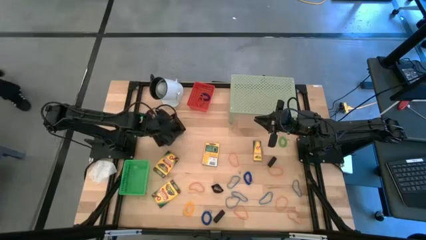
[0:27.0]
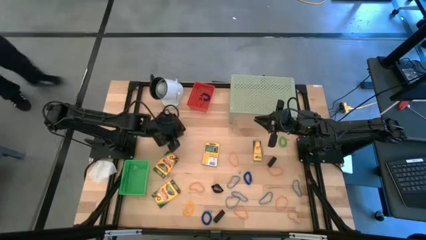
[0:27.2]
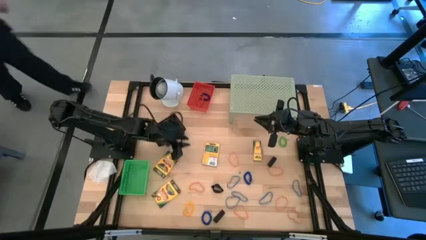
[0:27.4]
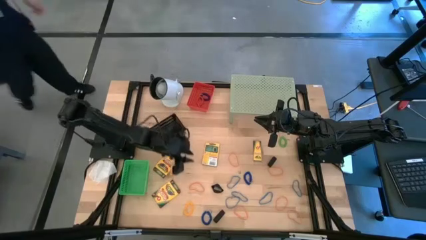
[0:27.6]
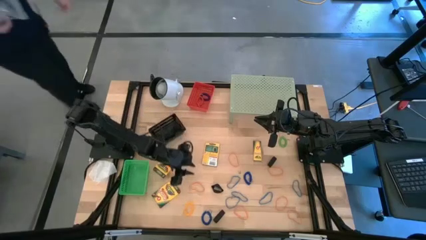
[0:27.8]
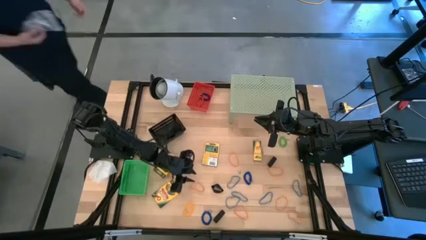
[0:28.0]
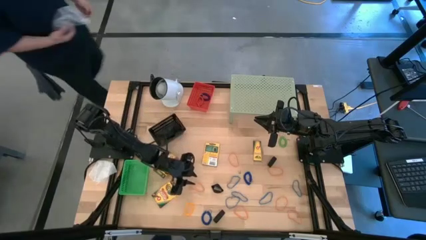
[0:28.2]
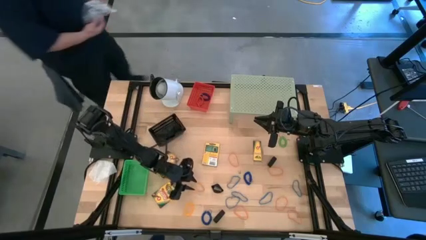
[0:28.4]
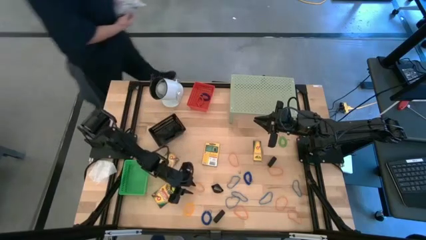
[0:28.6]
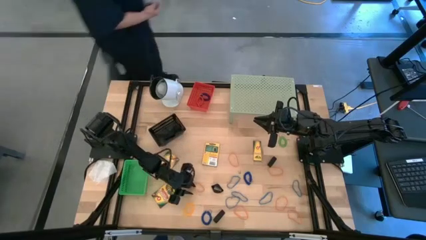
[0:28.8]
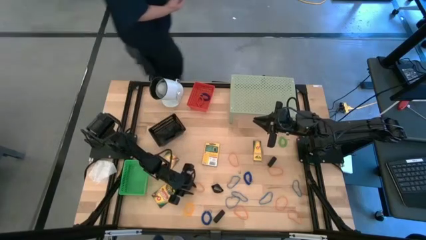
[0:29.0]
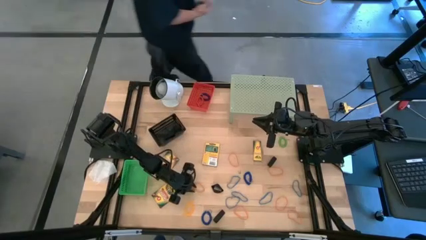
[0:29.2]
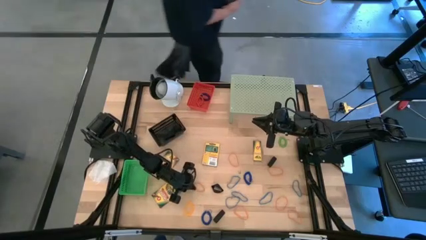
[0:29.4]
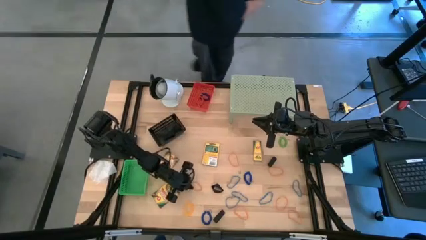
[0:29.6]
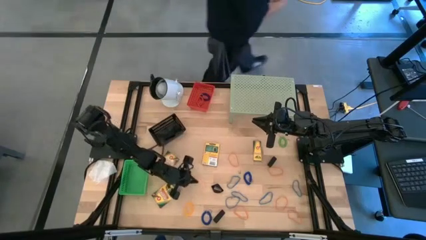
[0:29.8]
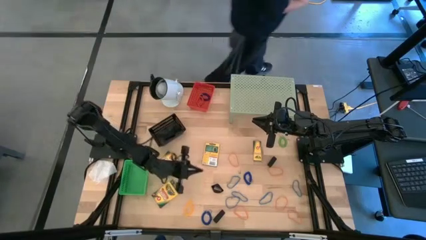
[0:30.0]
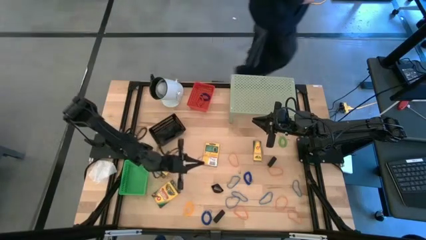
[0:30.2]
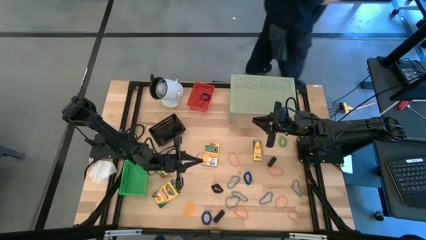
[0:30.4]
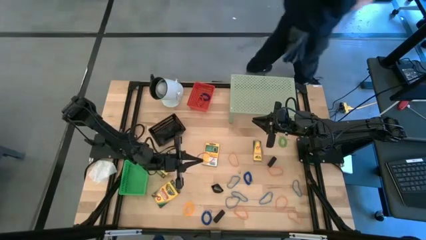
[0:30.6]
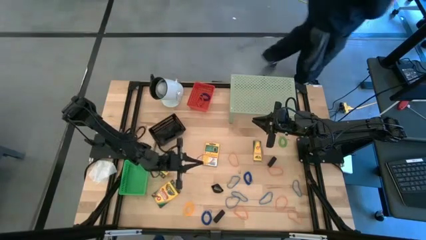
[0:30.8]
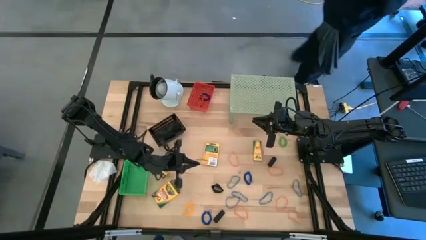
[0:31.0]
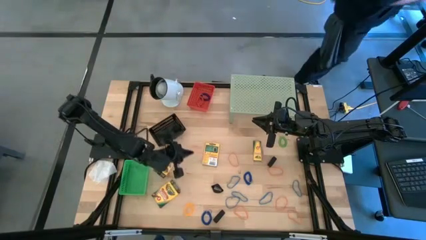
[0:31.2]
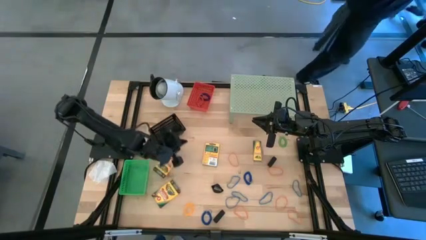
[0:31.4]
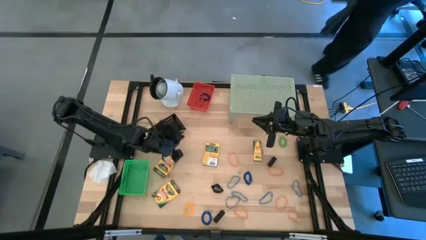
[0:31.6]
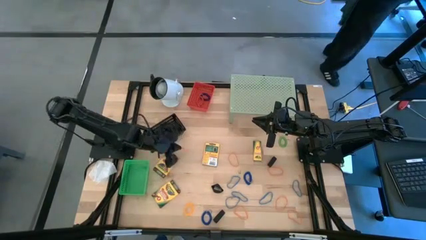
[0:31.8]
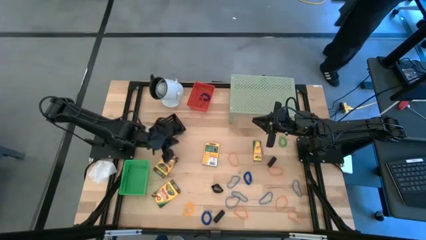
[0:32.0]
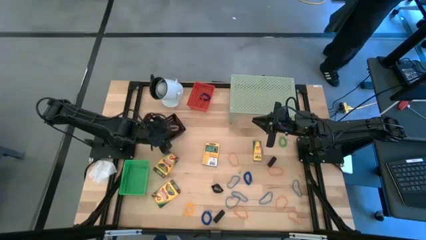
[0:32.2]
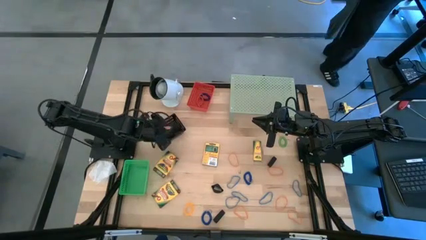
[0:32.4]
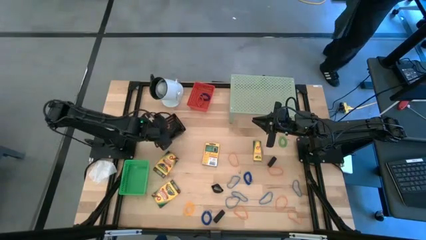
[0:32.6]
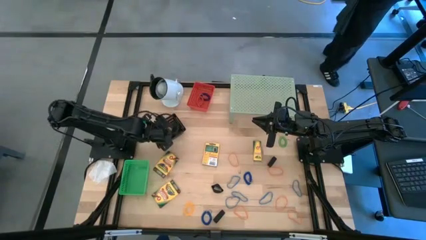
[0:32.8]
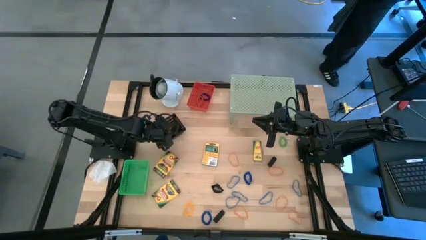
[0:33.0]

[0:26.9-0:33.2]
Task: Pick & Place Office Desk Supplies
Put the orange rubber band into the black bin

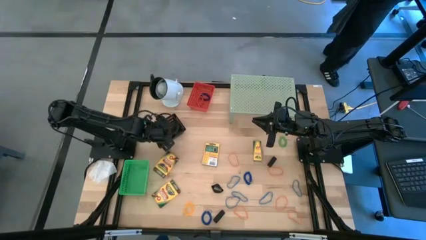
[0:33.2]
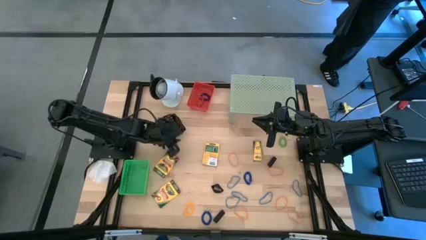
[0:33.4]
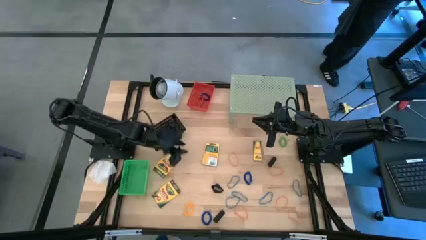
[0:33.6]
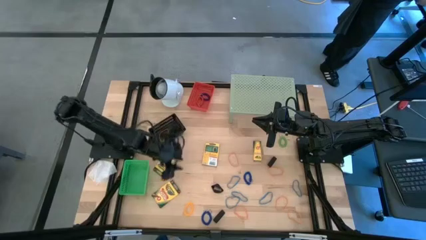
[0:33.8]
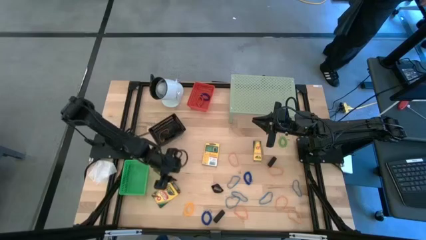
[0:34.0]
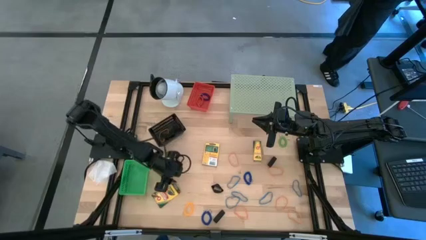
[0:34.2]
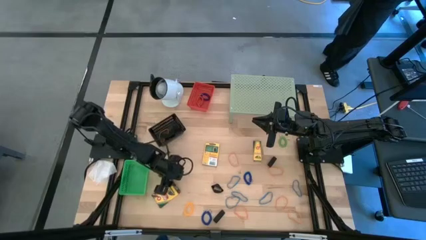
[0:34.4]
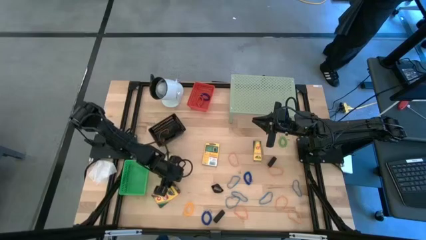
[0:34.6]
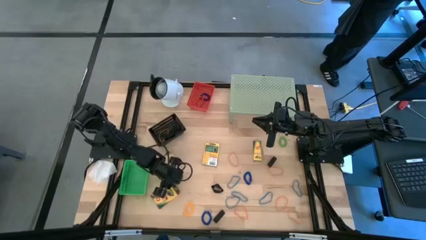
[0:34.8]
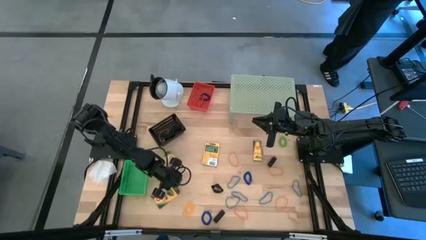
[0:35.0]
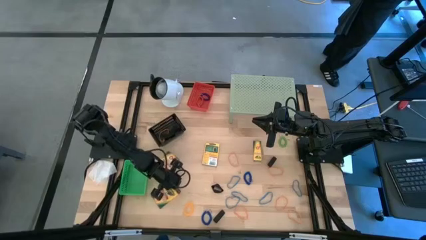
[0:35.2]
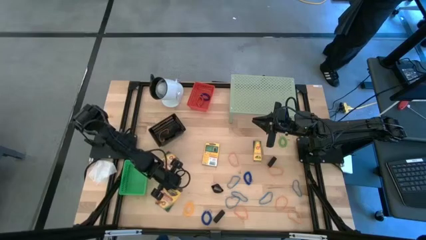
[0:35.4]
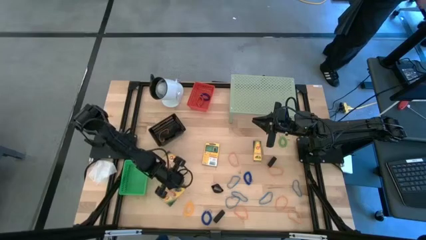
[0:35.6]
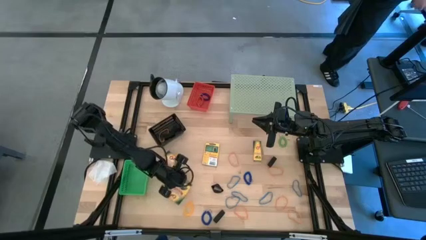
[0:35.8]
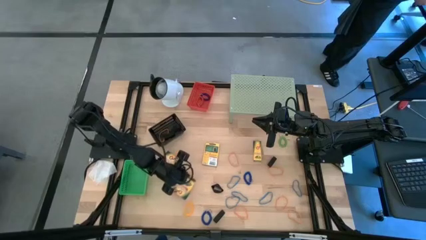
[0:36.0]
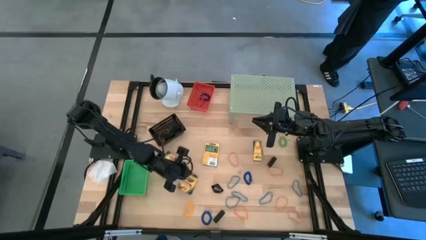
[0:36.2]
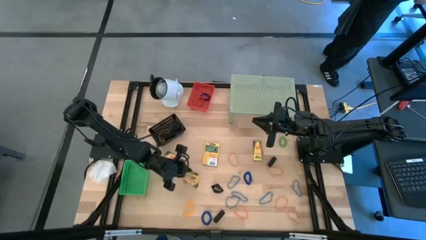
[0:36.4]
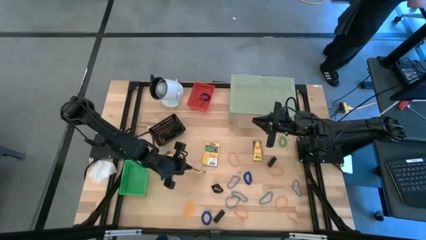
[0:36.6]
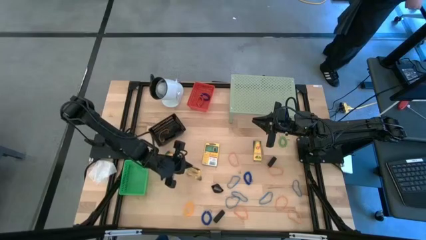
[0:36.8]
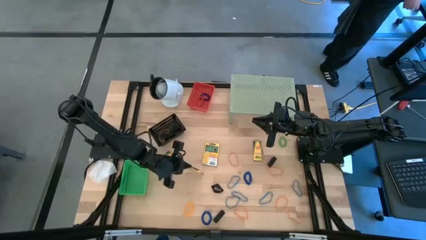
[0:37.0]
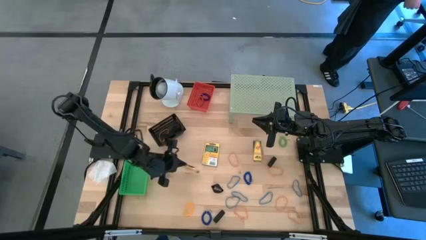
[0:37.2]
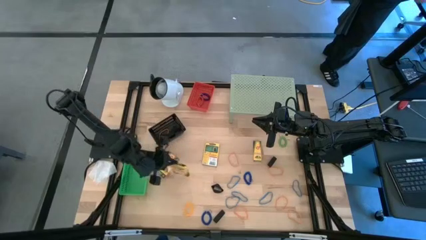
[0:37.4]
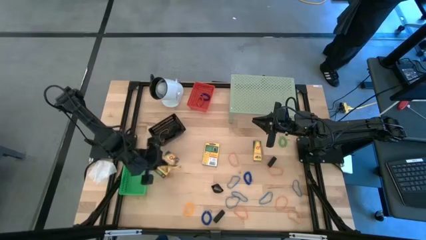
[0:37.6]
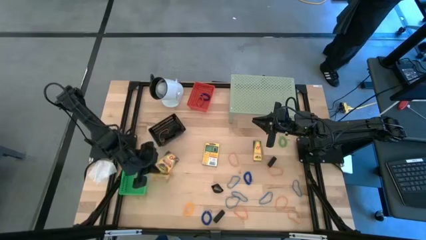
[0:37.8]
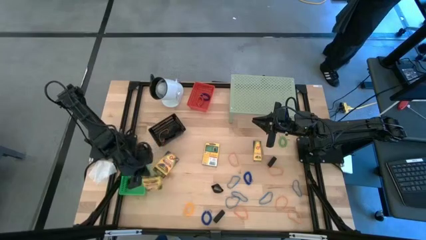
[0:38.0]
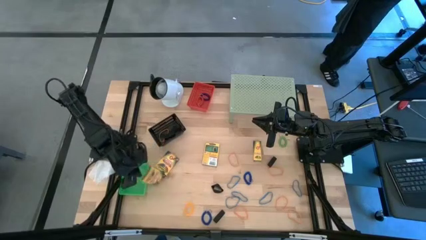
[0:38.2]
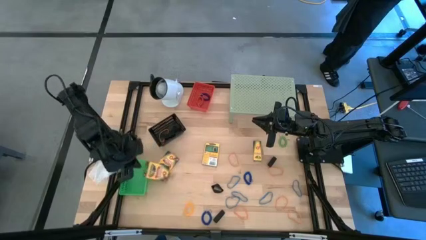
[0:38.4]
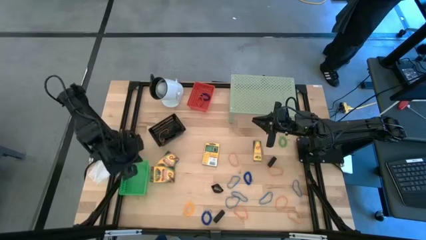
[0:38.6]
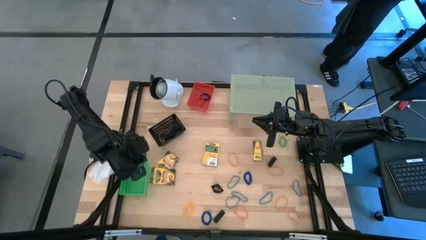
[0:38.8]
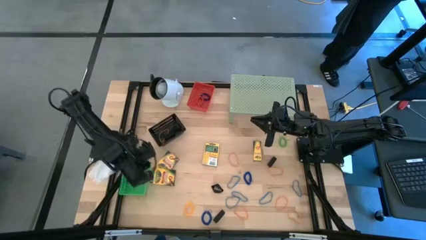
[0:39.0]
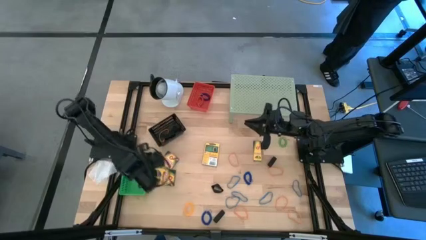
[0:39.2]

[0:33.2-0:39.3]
Put the crayons box into the green bin

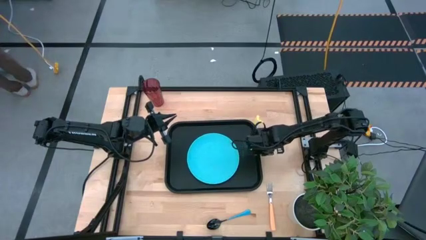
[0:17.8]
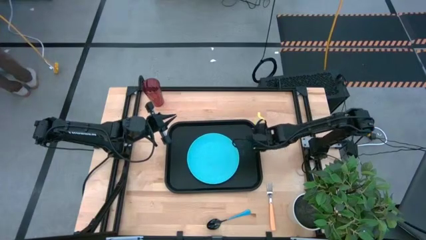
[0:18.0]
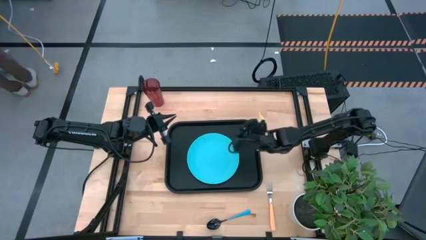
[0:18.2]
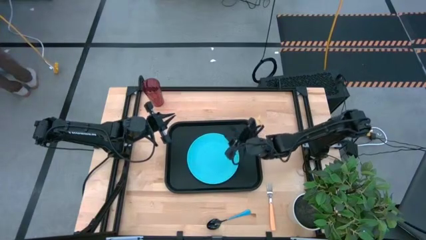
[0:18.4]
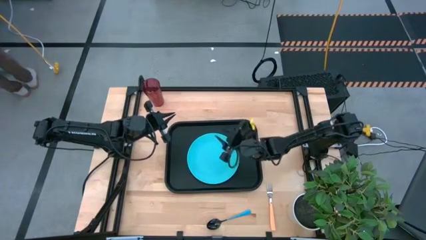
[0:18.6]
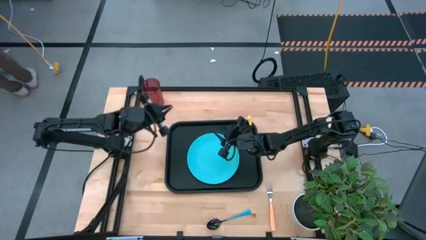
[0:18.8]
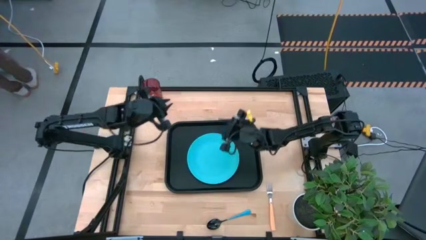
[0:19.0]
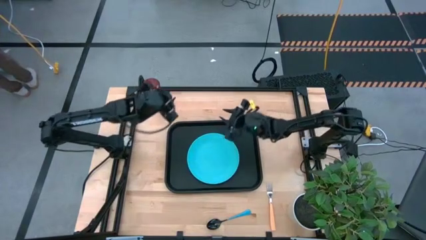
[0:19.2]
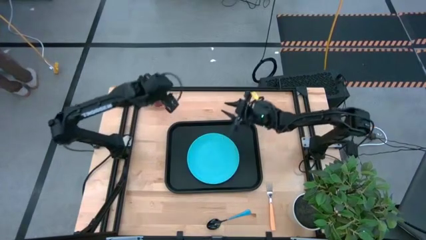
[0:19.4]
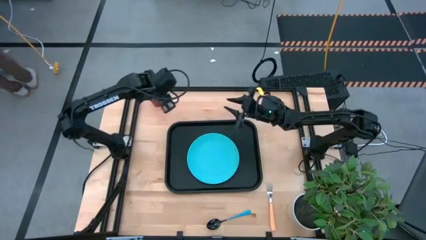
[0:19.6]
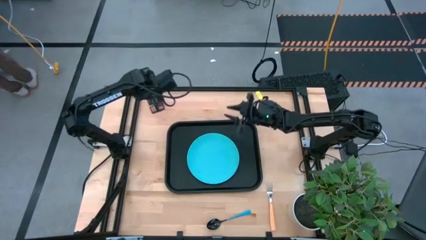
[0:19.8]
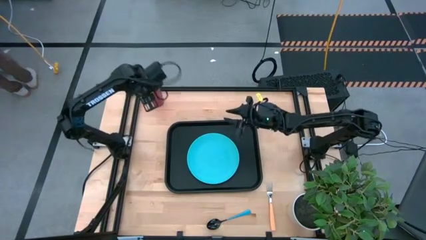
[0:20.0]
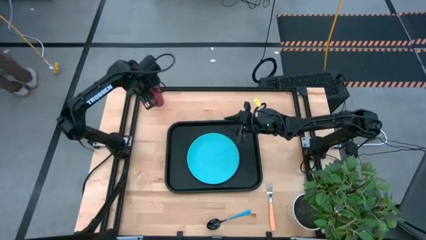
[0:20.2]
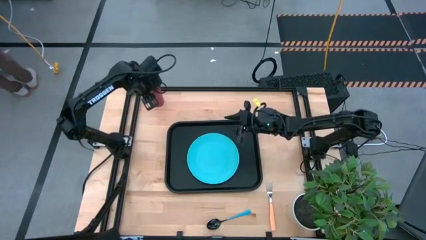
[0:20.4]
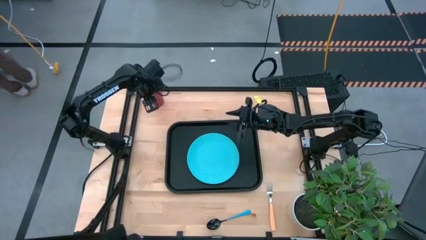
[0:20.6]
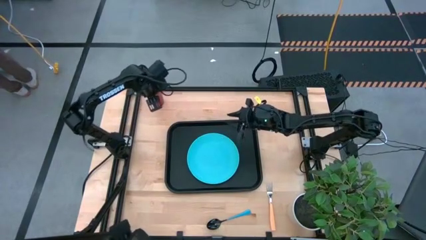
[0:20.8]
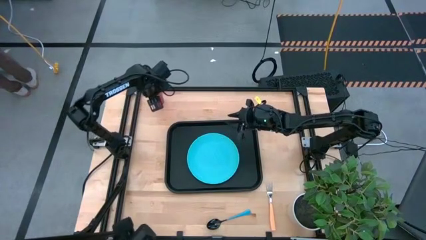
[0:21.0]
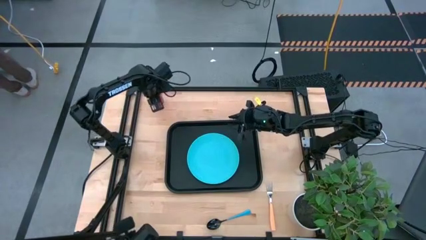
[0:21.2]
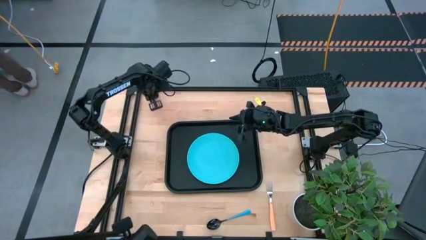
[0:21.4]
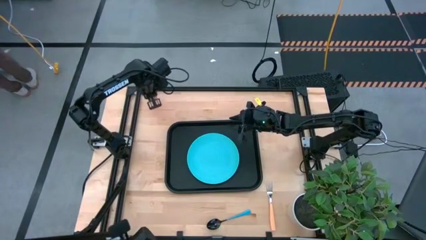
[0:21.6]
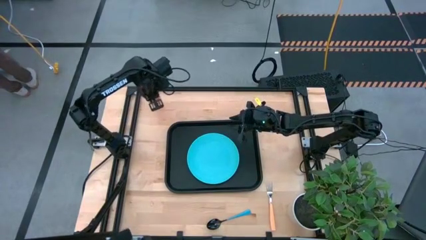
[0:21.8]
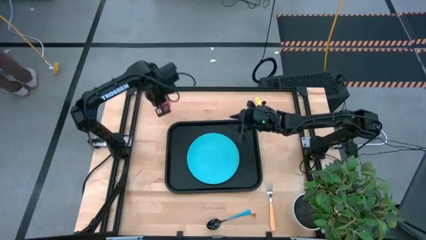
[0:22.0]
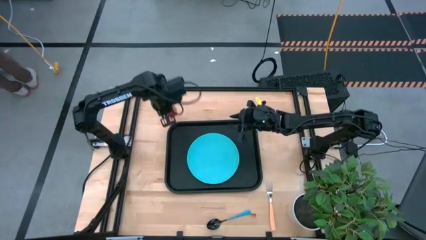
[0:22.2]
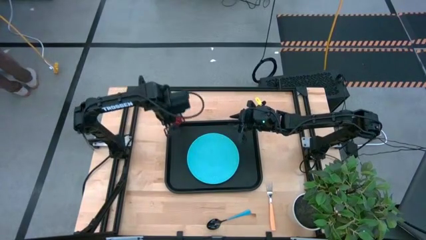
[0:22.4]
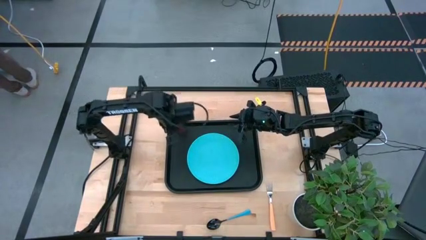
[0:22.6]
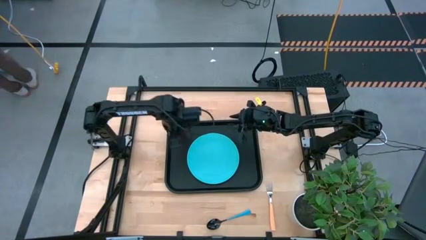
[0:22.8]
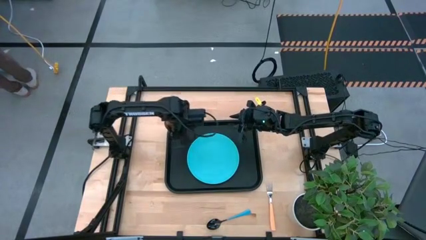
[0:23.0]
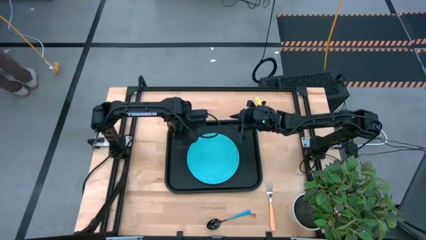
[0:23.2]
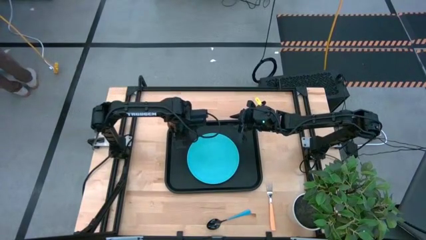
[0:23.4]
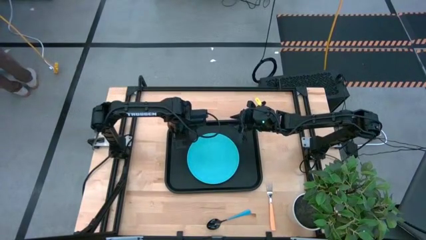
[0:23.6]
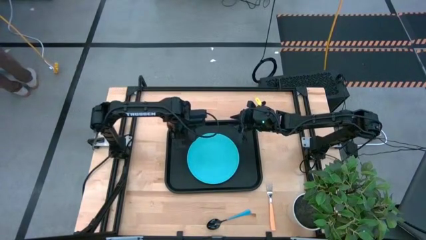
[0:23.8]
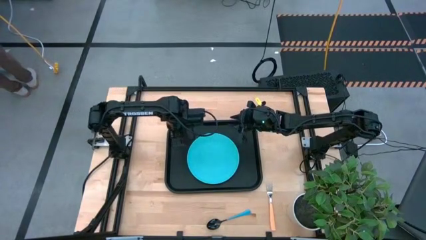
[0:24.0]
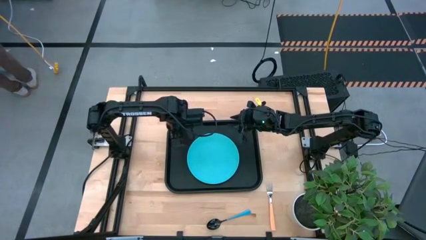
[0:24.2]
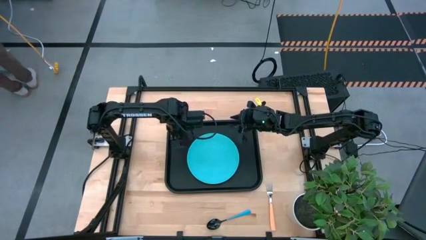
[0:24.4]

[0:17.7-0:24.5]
Task: Pick and place plate/cup/fork/spoon on tray
Put the red cup on the black food tray
